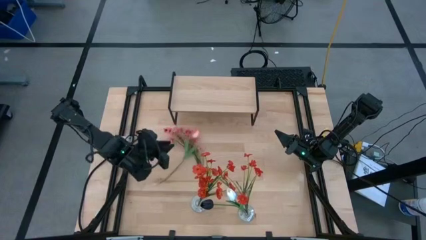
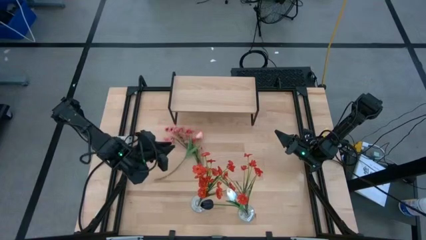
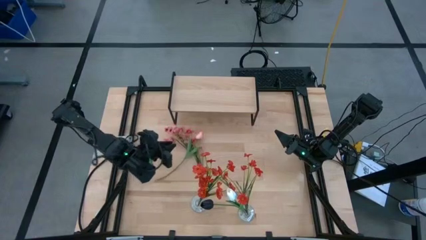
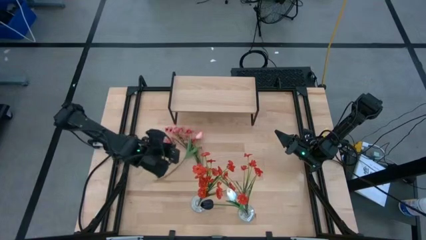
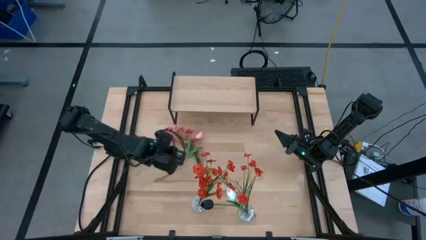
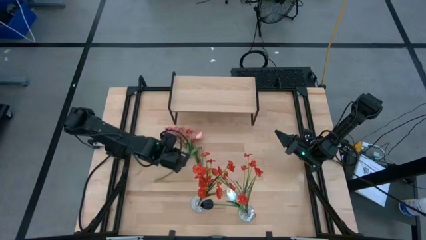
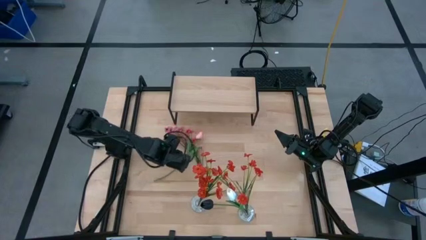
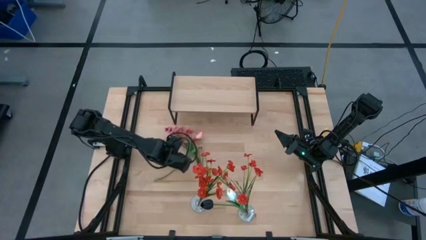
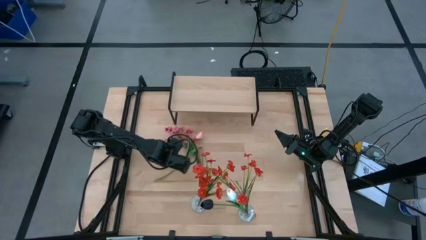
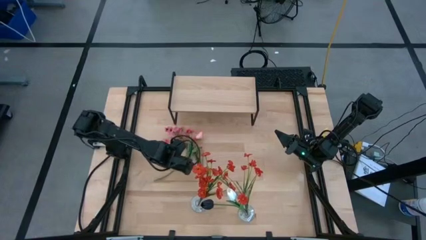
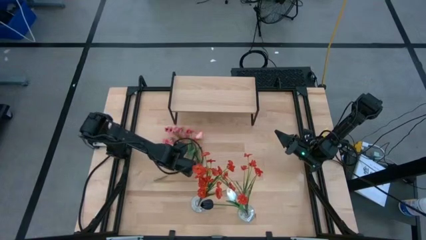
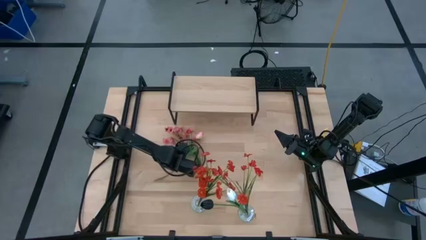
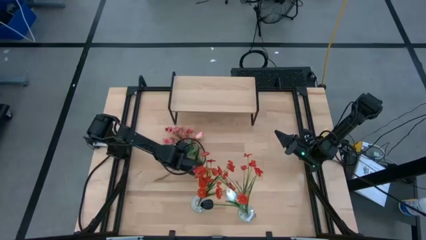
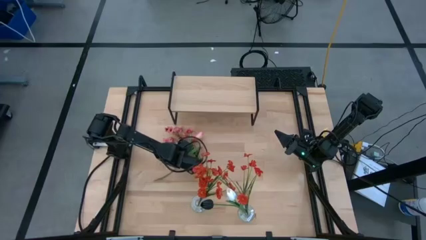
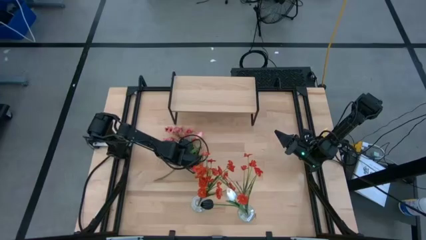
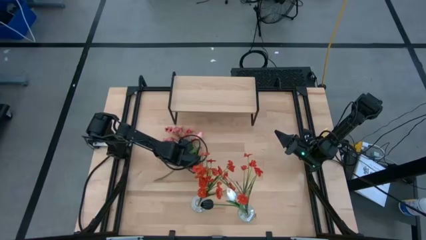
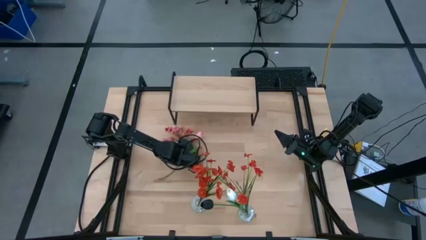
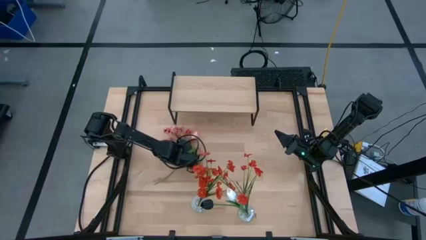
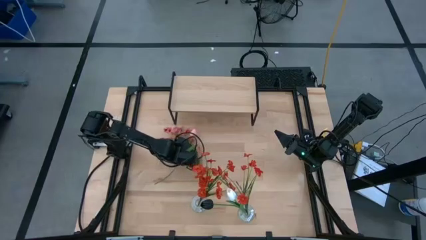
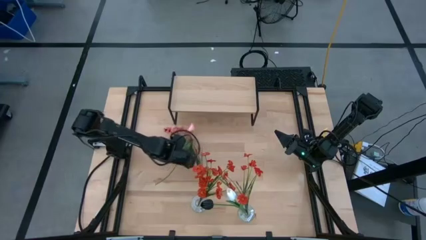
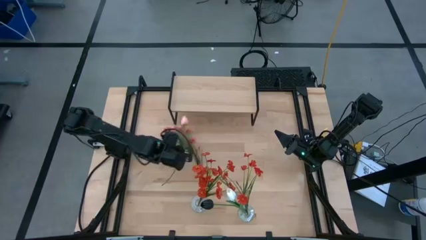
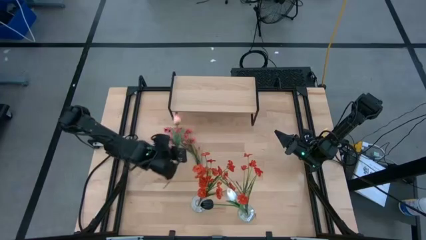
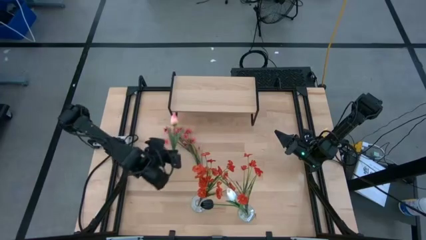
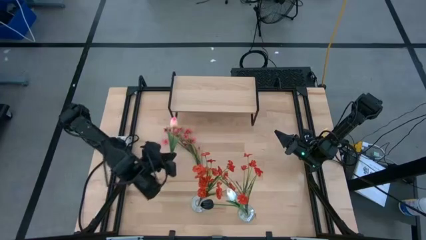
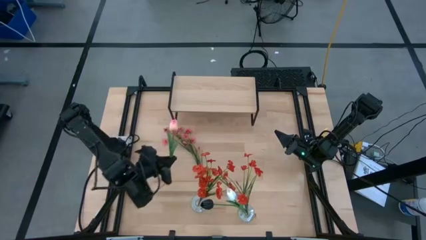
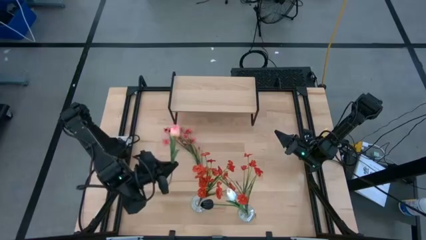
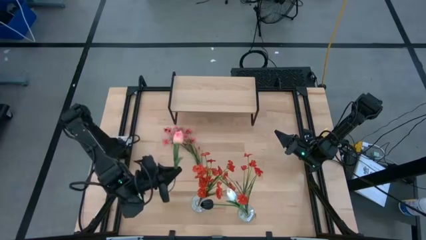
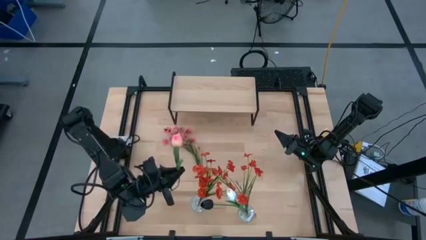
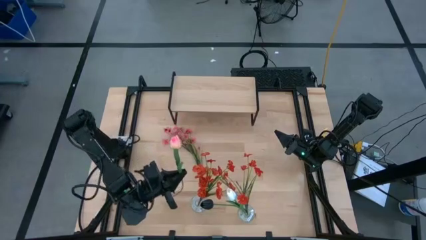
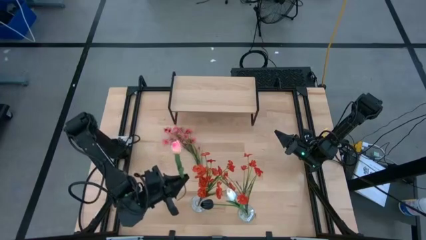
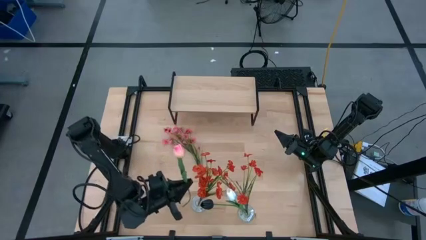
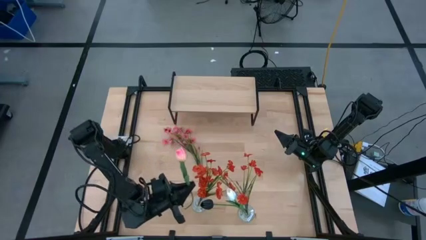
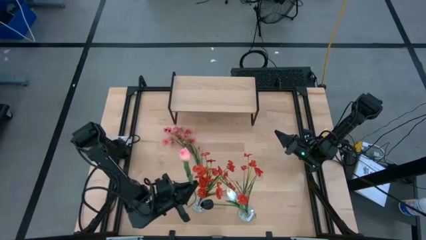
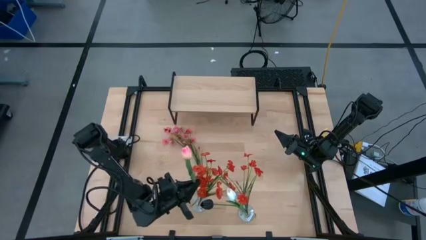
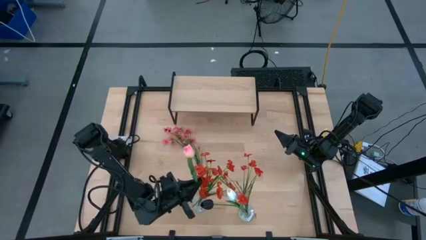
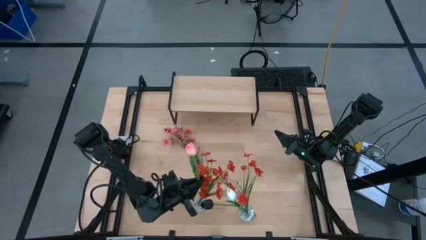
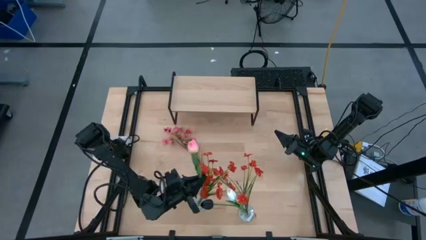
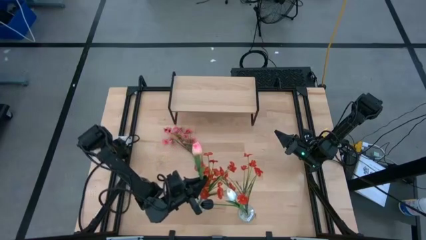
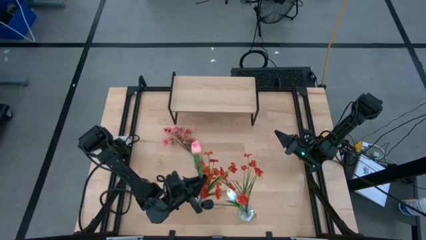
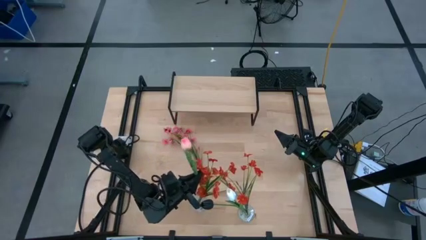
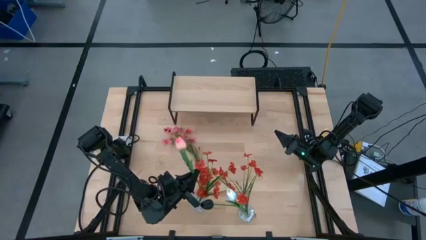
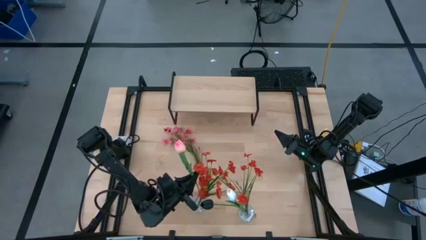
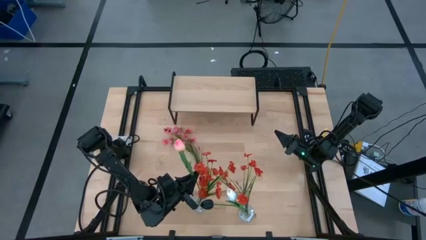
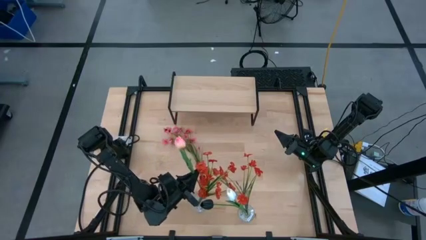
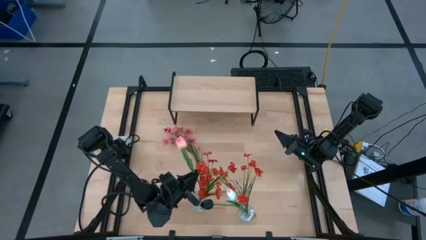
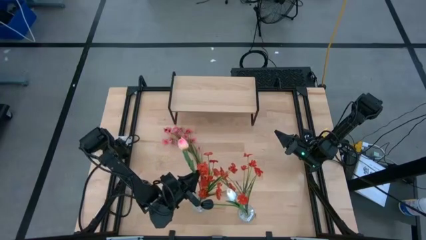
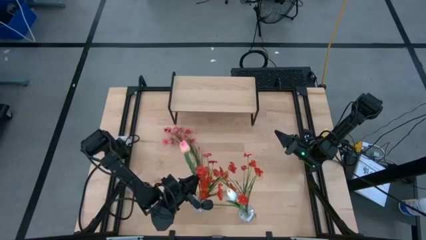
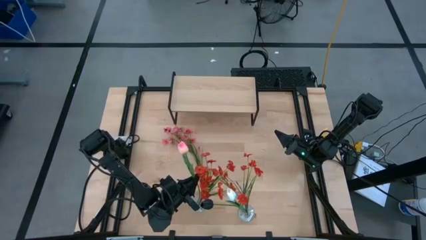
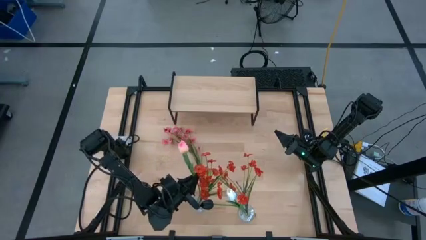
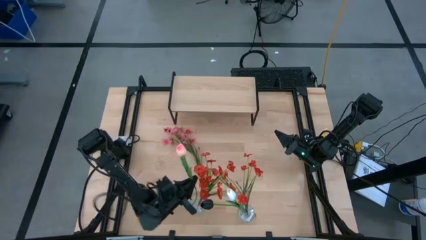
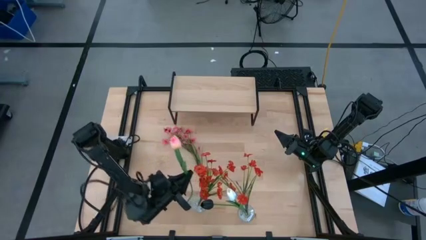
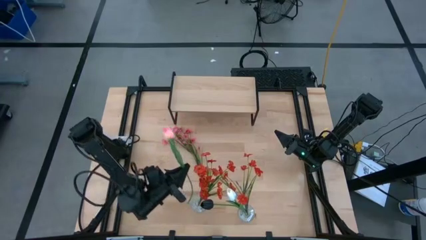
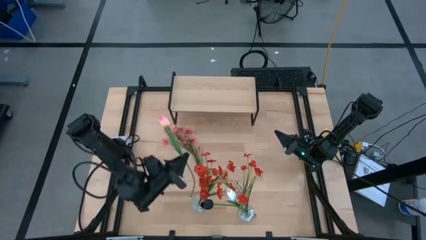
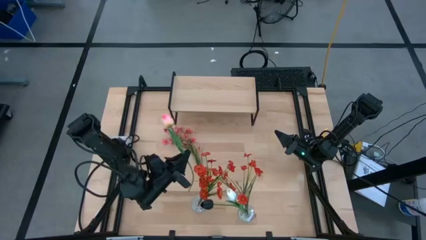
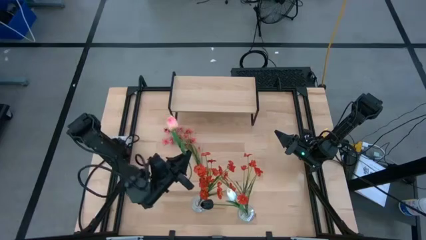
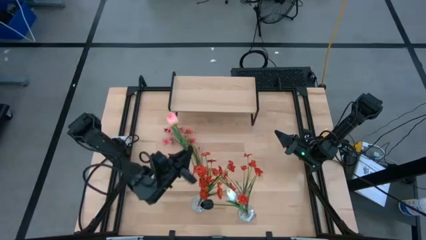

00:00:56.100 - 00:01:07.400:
Task: Pick and place flowers into a vace then onto a shelf
Put the light pink flower into the left transparent vase

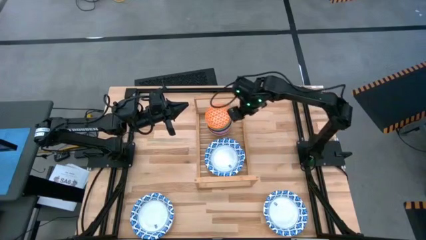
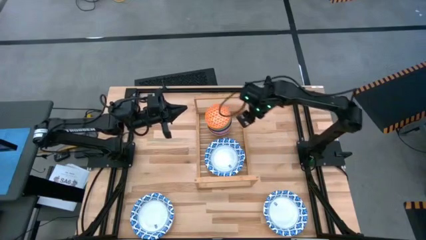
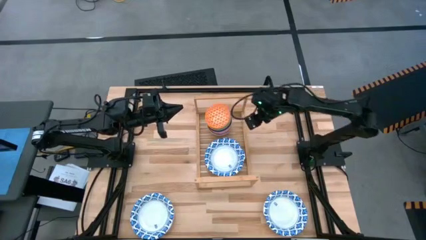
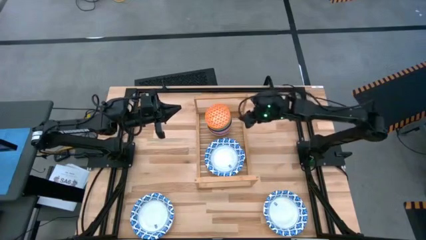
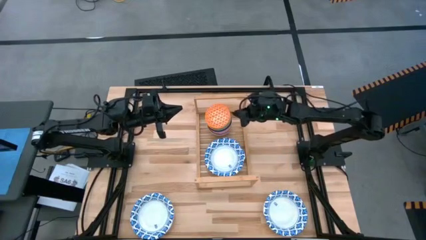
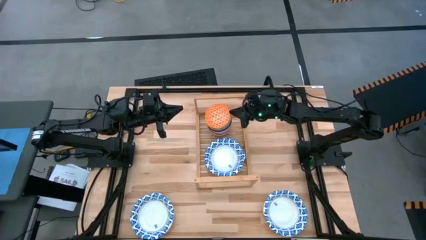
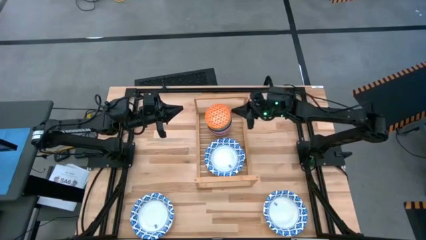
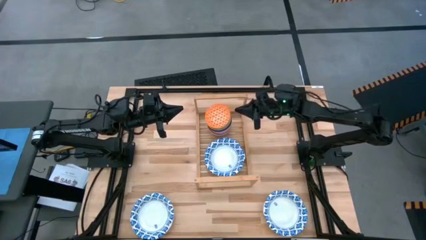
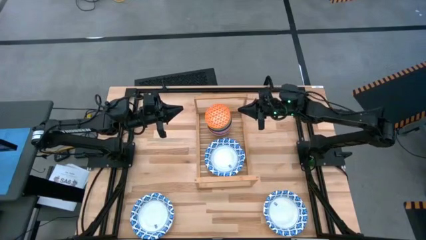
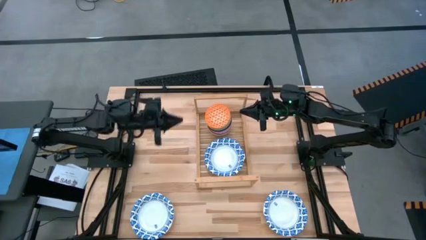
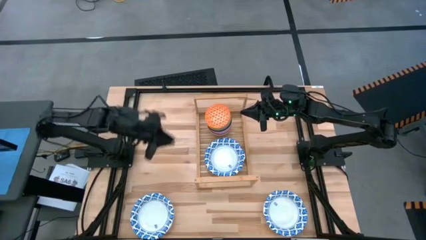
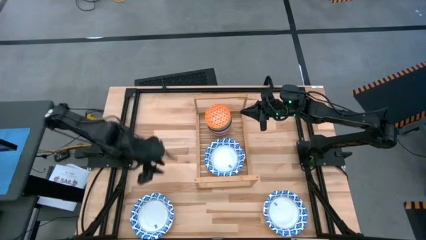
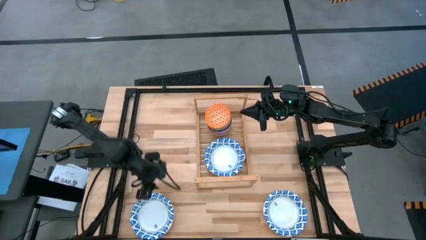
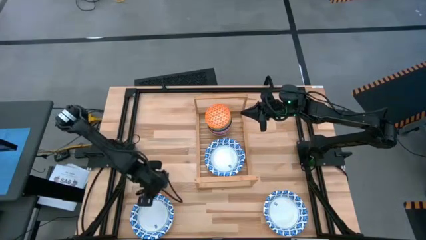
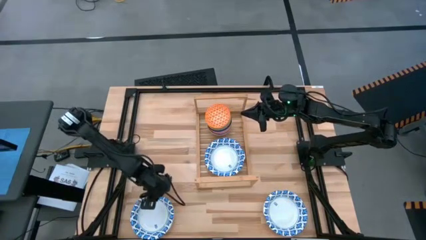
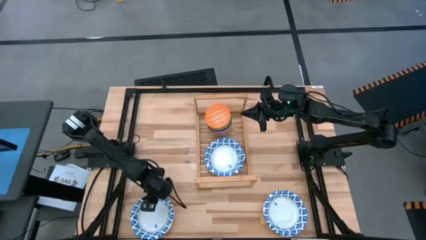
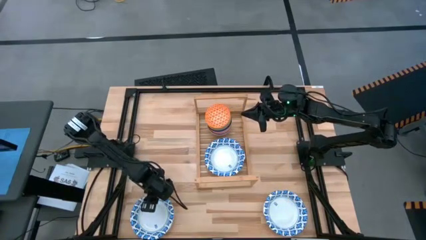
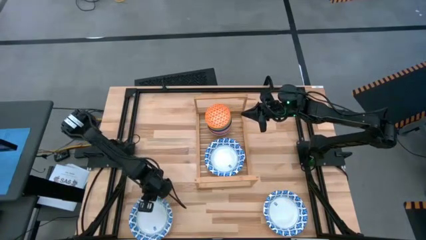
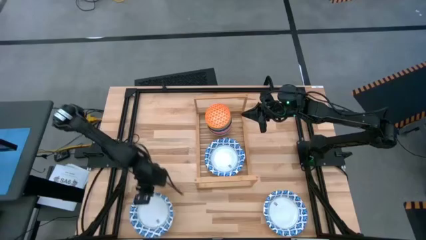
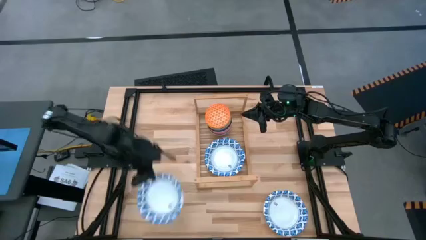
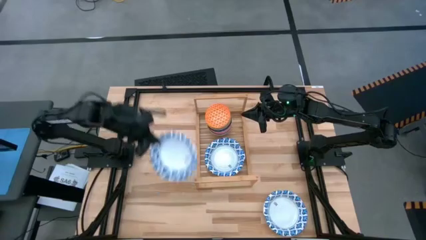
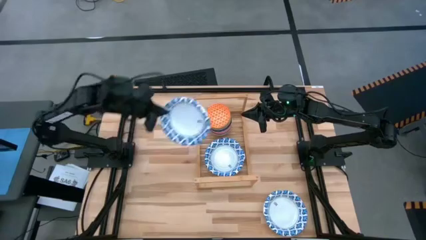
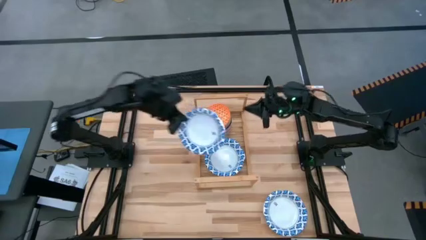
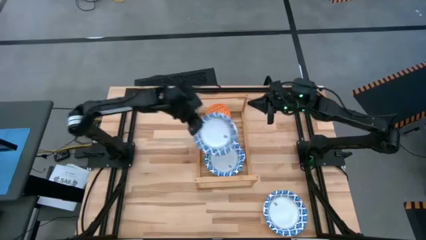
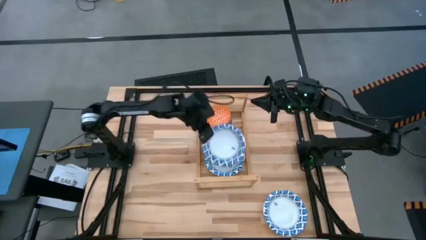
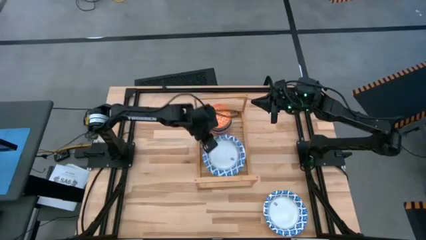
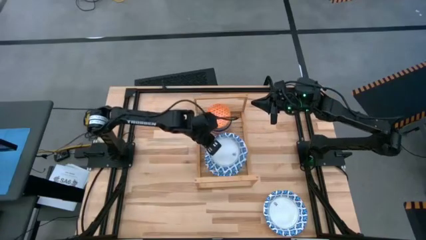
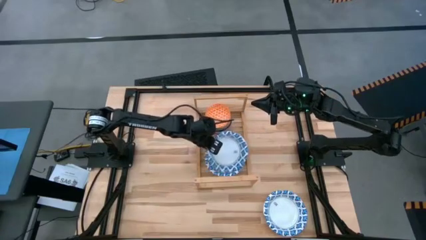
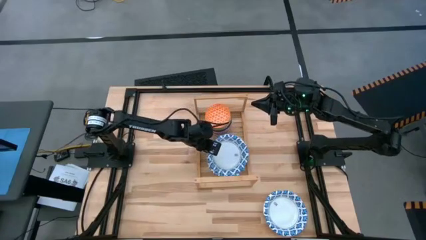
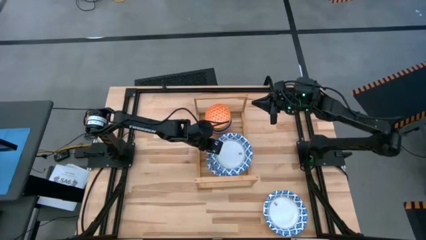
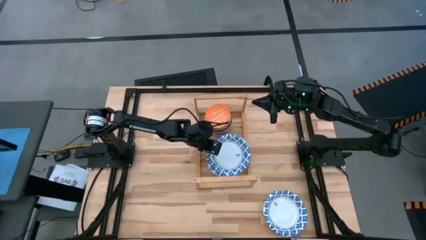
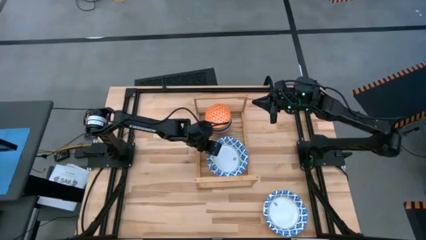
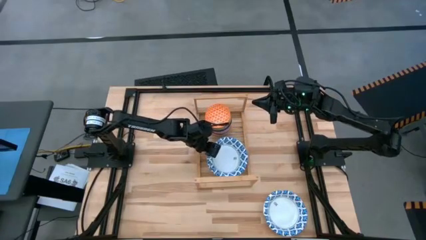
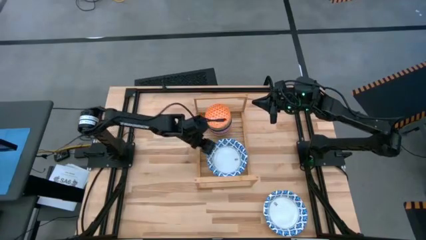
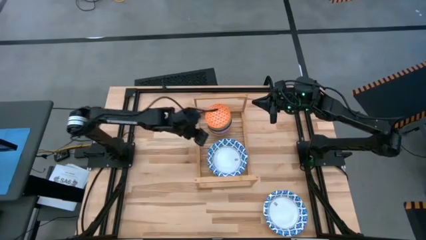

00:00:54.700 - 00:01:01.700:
Task: Place and stack bowls onto a shelf
Stack the blue white bowl on top of the blue white bowl on the shelf
